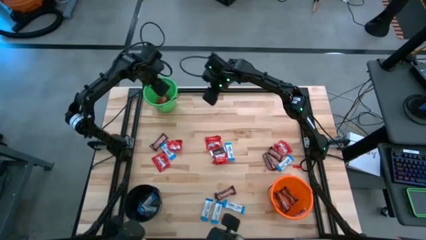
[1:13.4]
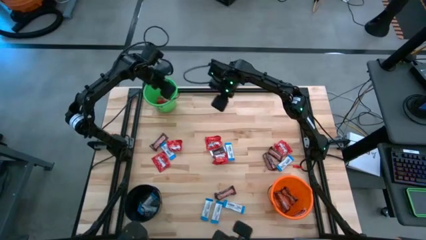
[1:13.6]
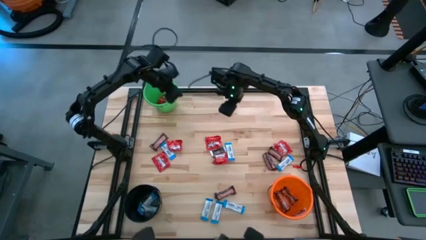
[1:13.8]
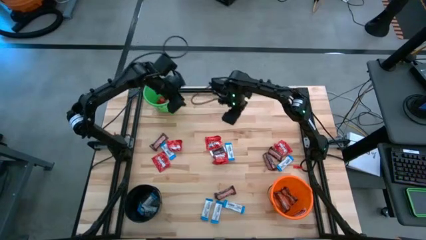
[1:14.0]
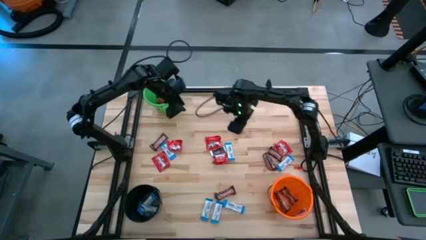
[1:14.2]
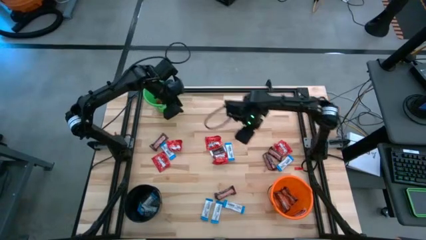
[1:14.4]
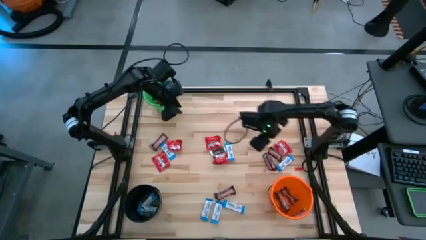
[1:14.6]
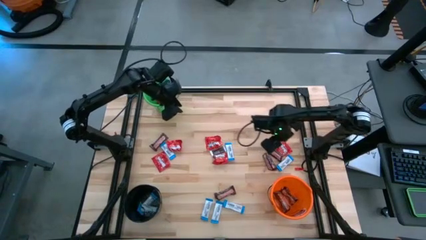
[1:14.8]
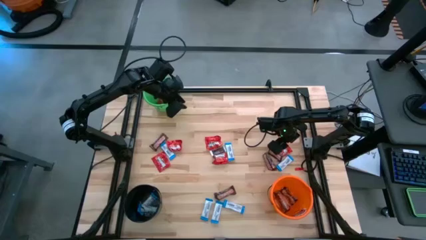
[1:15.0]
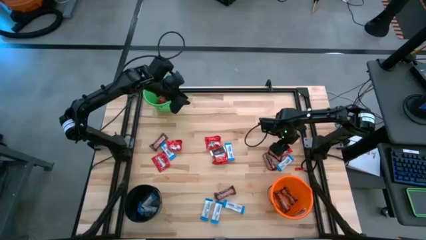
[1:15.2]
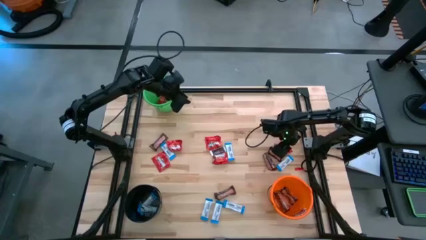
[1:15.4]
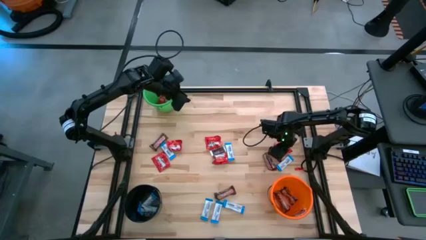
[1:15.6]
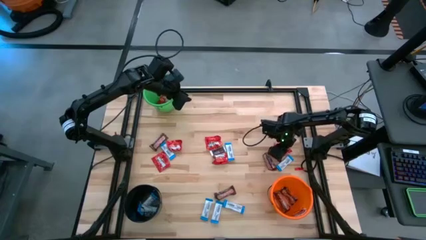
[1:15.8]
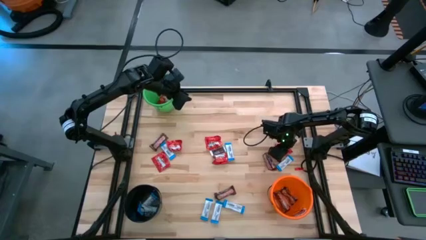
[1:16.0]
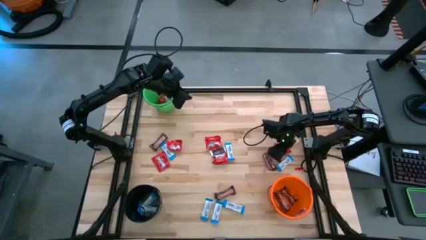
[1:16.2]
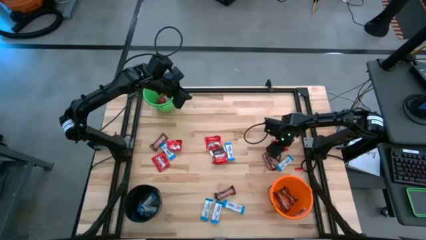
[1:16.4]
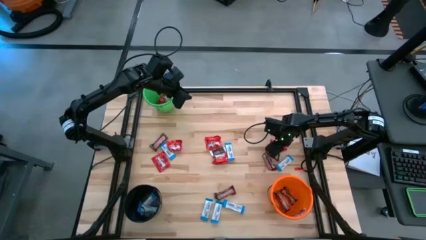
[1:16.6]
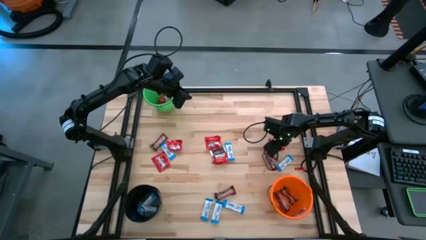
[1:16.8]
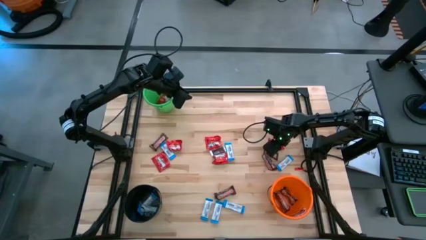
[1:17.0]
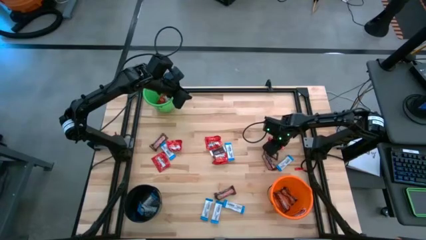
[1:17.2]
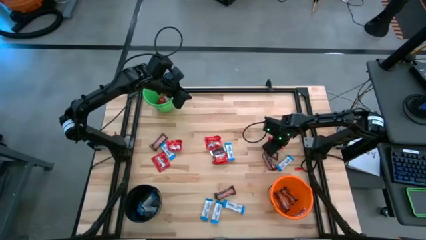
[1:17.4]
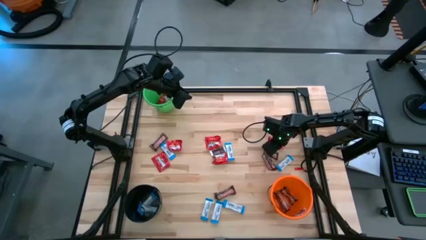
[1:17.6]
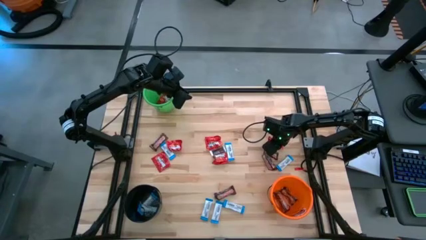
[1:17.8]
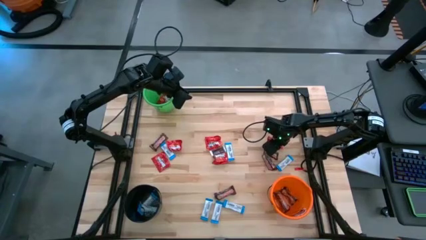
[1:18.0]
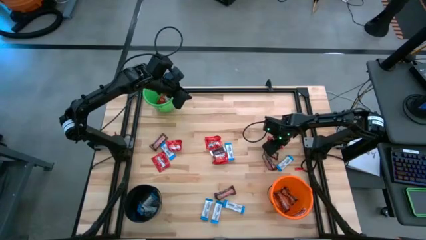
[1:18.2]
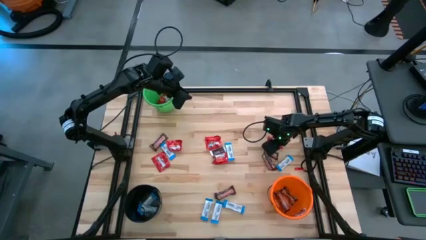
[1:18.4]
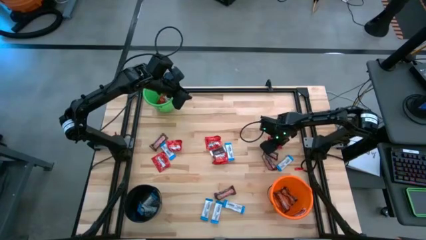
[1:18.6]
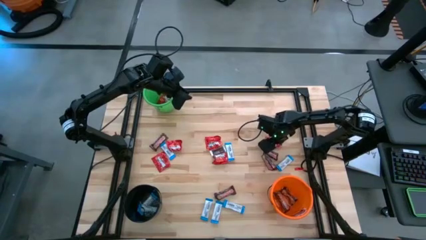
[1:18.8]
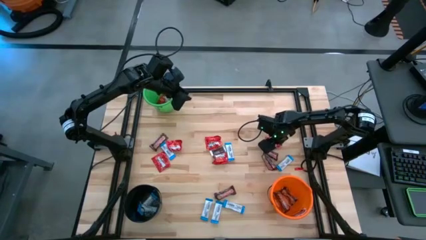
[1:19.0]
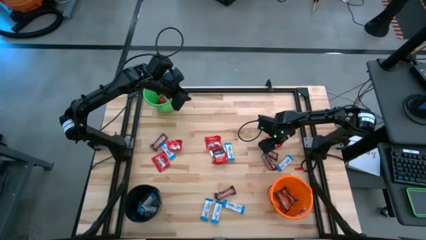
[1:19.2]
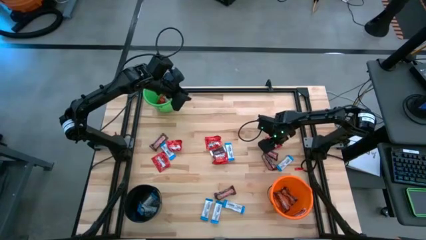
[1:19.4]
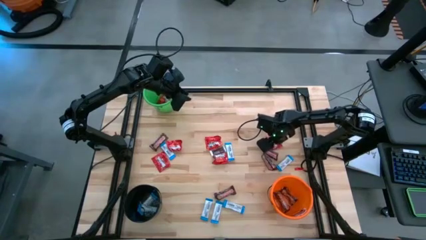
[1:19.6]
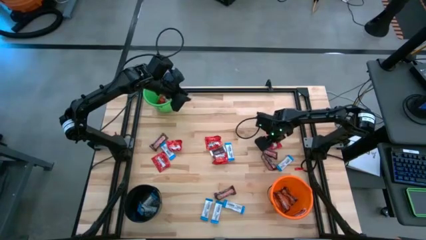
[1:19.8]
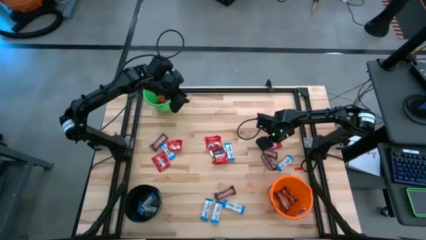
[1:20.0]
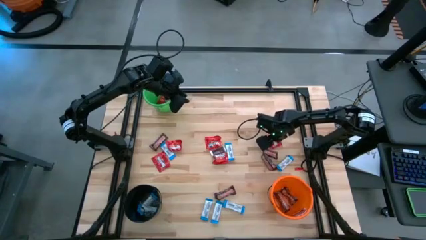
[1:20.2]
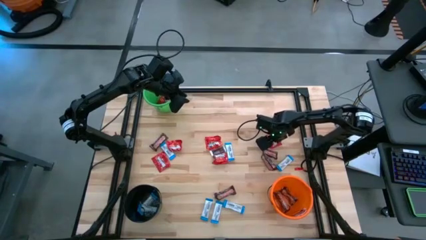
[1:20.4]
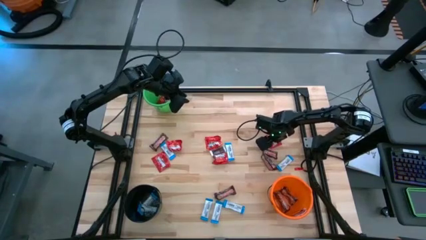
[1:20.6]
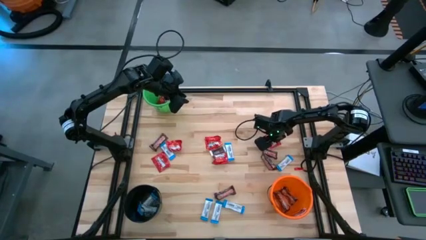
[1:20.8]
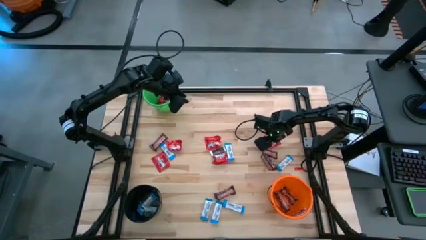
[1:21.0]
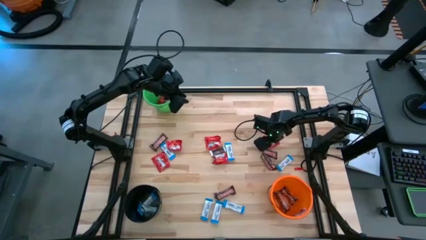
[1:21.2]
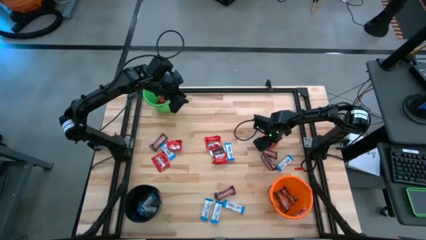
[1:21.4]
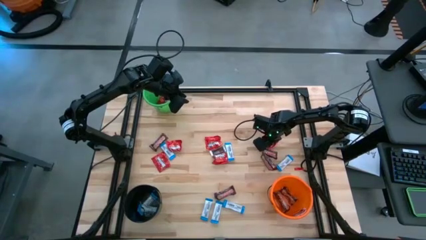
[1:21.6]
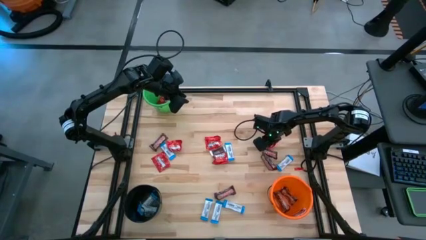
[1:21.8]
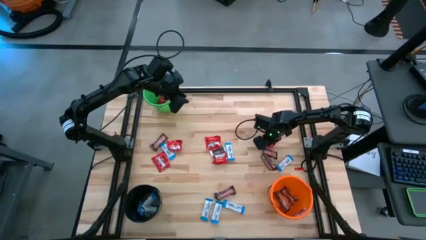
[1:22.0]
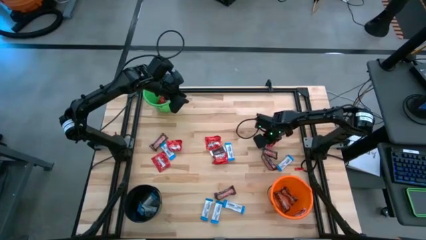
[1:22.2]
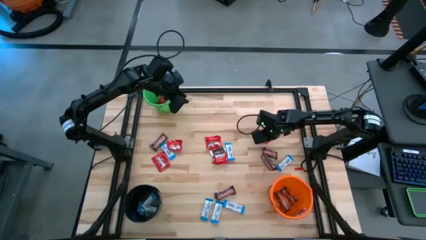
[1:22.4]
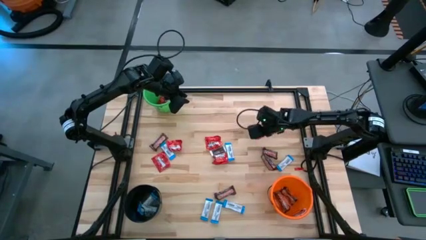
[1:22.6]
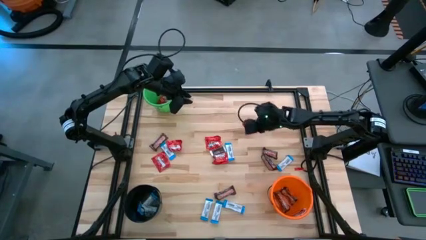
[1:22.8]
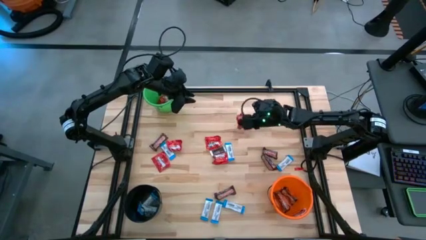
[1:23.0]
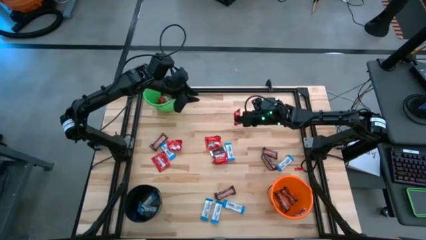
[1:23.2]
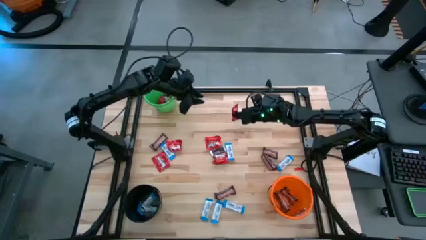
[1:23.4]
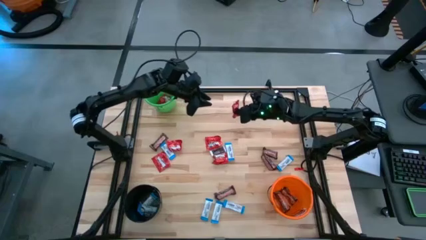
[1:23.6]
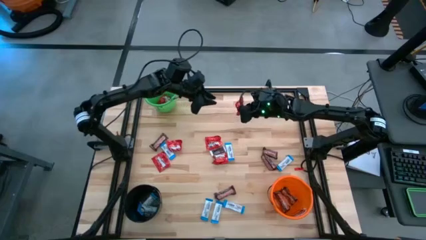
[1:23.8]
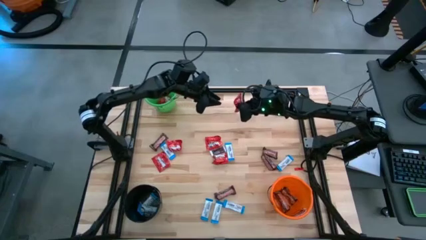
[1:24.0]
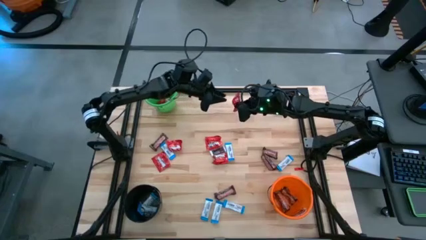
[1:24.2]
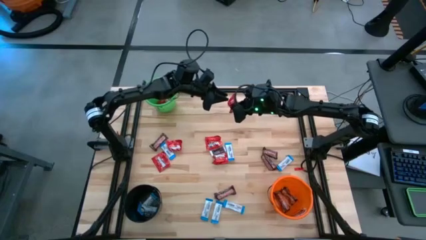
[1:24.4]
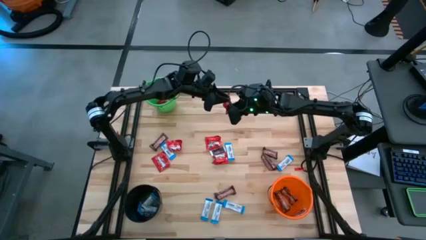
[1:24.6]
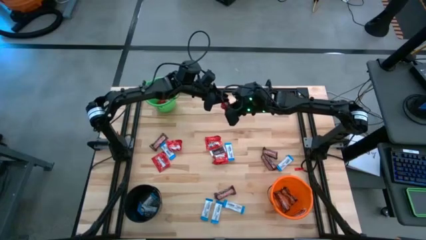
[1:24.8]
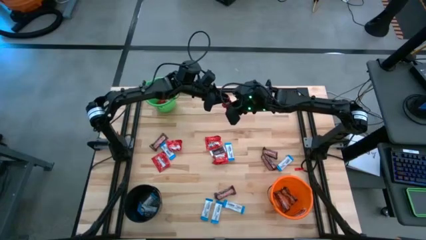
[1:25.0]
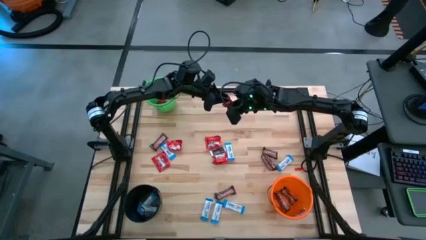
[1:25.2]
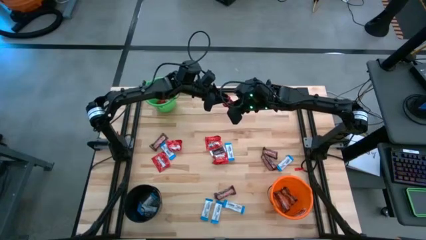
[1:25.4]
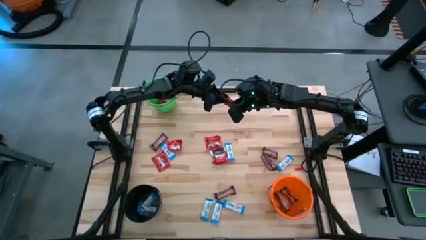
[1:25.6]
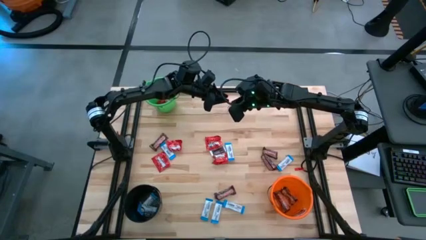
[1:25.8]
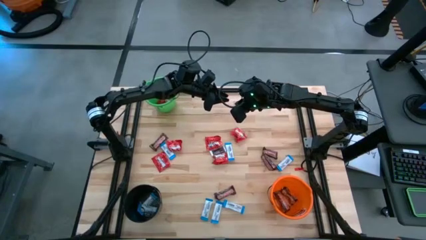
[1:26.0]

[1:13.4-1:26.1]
Task: Sort candy
Put the red candy into the green bucket

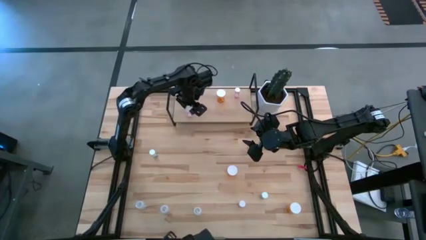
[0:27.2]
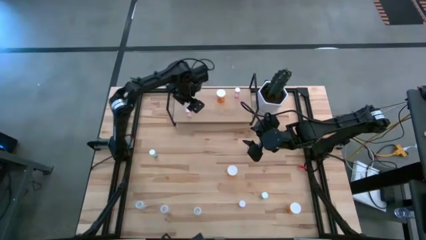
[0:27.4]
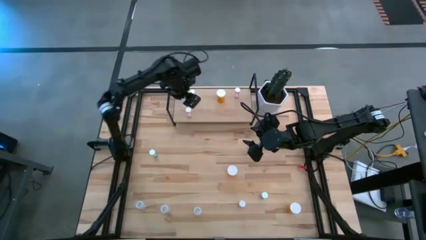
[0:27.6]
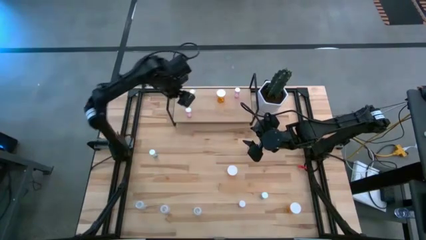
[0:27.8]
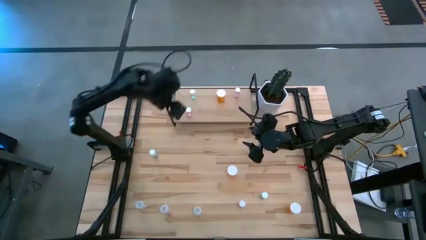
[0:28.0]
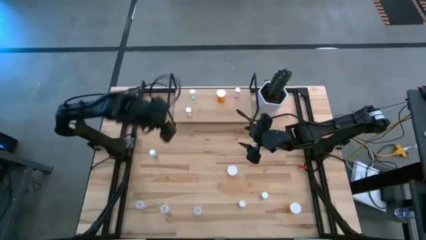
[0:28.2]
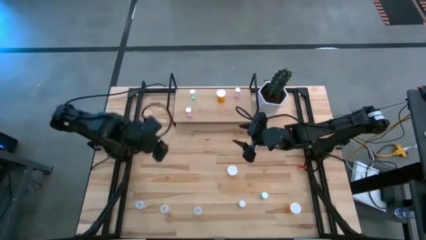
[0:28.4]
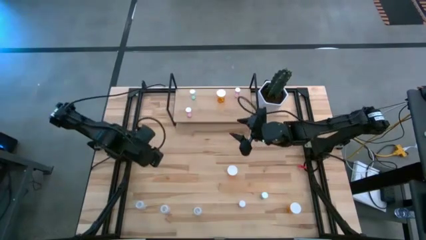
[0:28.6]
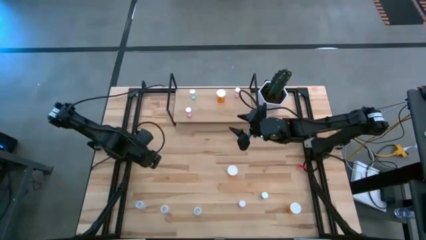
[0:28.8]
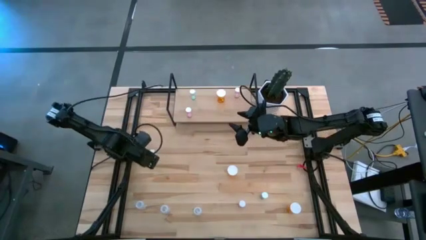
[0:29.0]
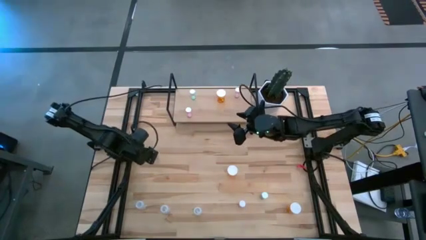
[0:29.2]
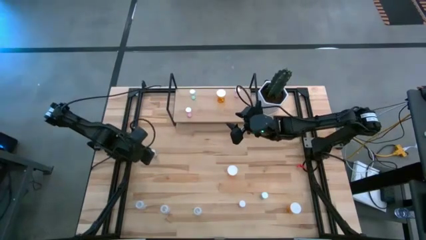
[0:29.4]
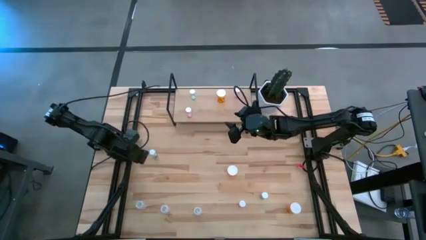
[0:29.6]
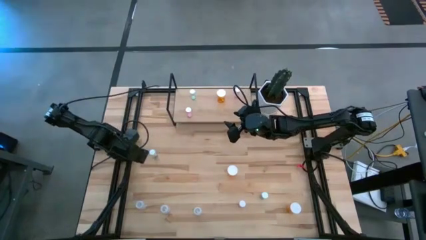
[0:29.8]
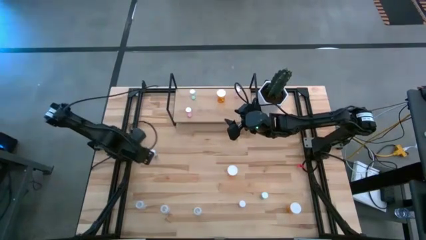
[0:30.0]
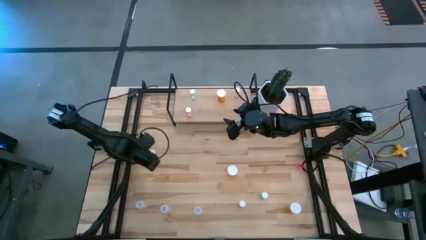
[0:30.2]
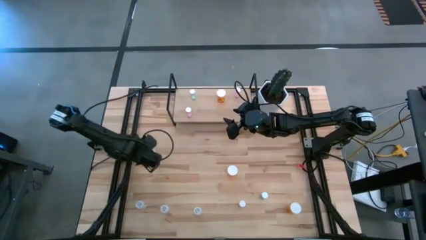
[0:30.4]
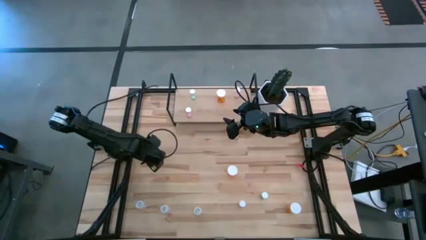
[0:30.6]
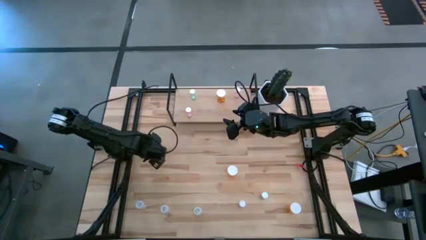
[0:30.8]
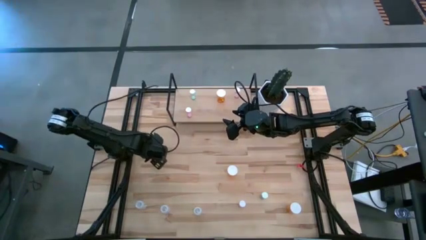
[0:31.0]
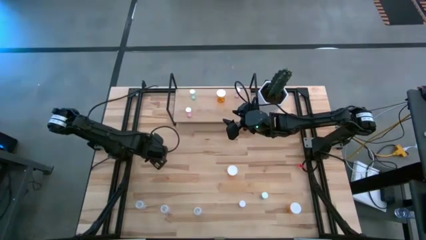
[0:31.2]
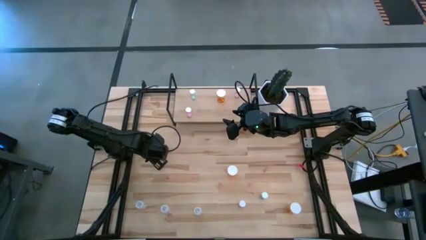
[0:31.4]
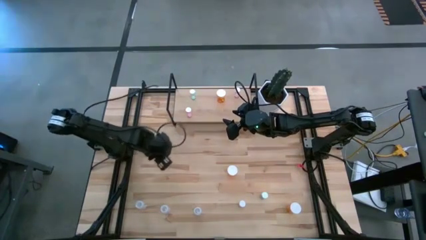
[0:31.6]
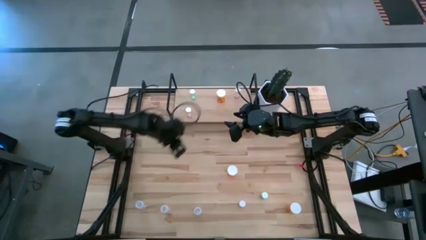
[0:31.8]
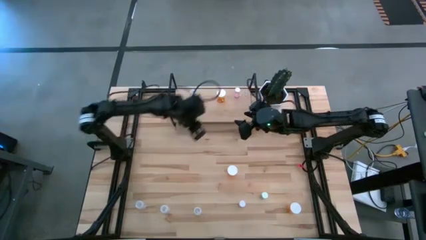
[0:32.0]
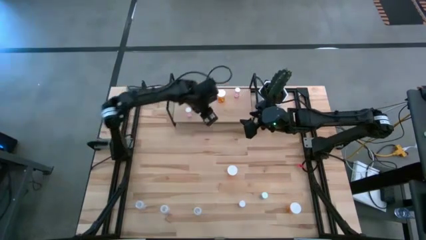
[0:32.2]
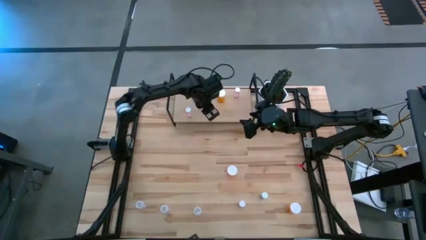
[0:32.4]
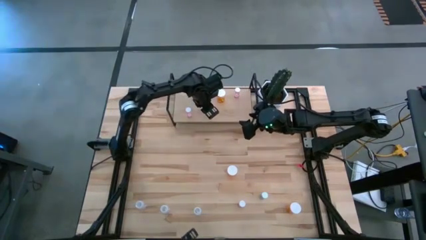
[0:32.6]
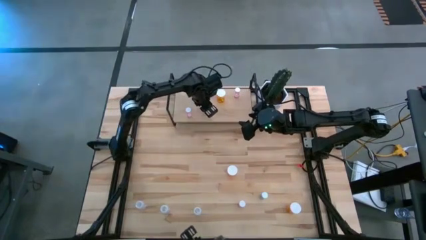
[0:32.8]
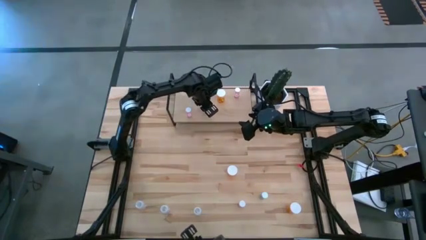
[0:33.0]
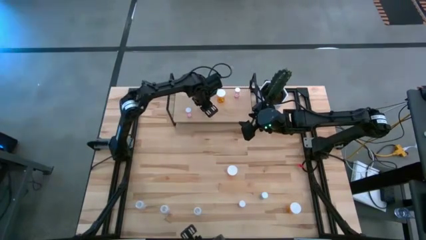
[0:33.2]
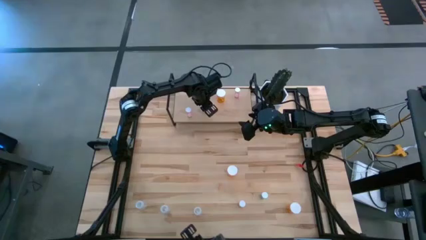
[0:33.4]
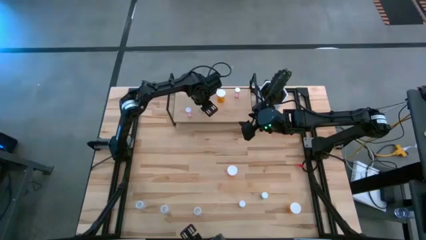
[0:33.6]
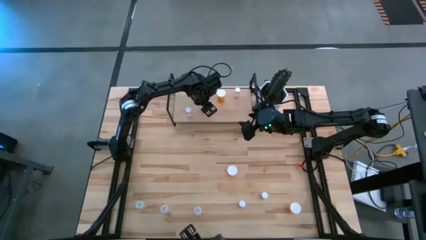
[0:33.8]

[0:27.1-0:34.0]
Task: Pick and place medicine bottles onto shelf by color
Put the left blue pill bottle on the shelf
